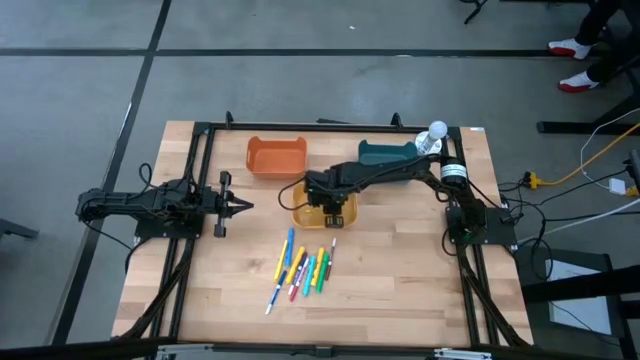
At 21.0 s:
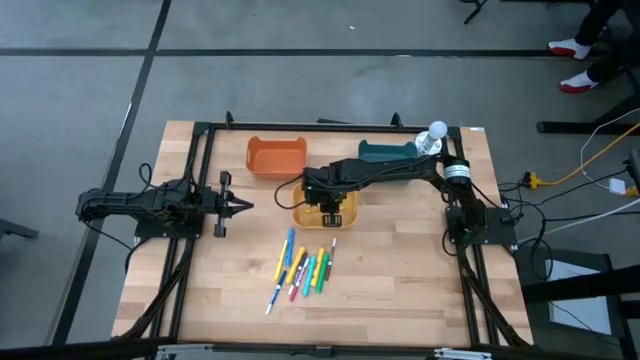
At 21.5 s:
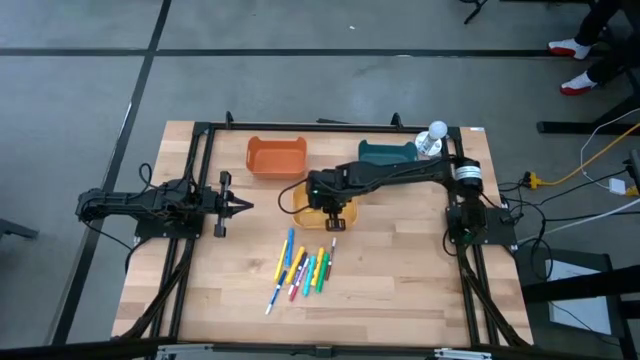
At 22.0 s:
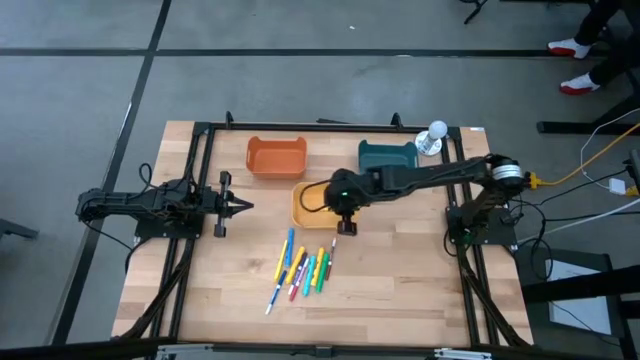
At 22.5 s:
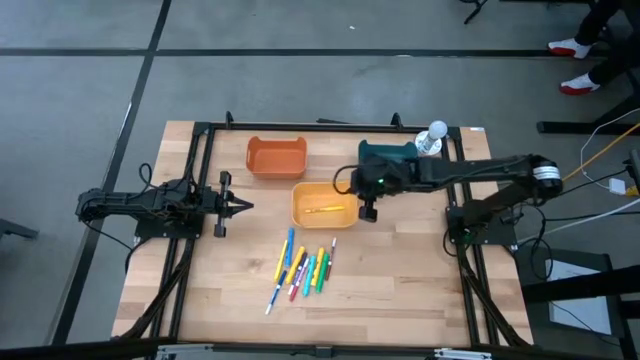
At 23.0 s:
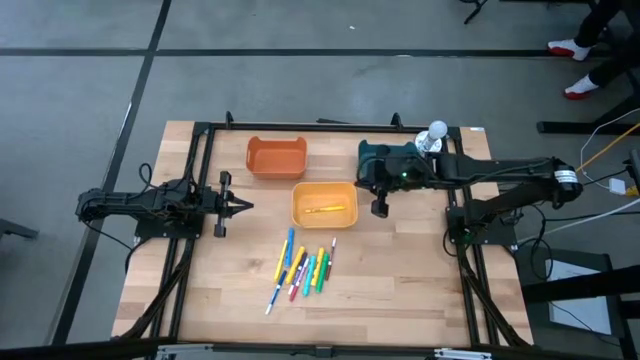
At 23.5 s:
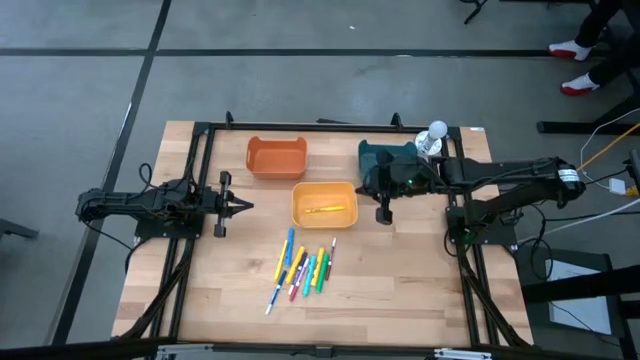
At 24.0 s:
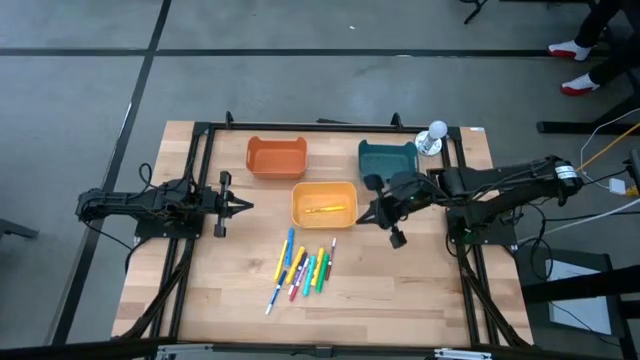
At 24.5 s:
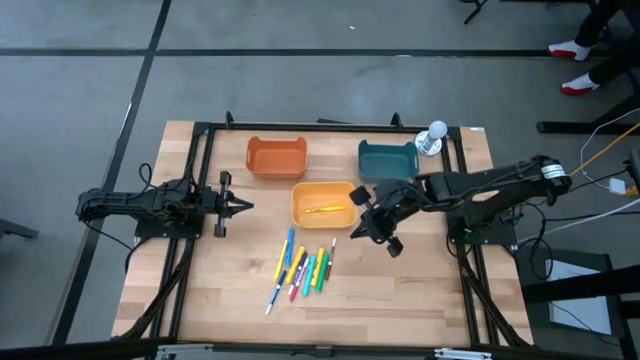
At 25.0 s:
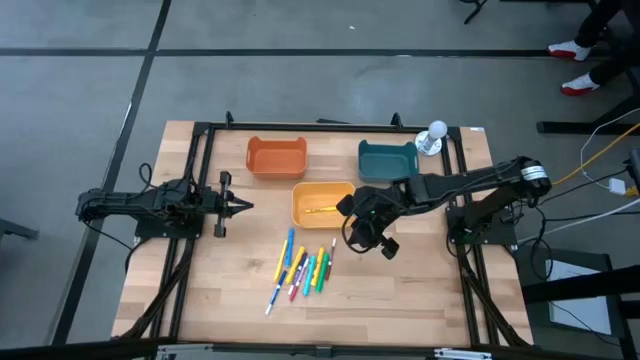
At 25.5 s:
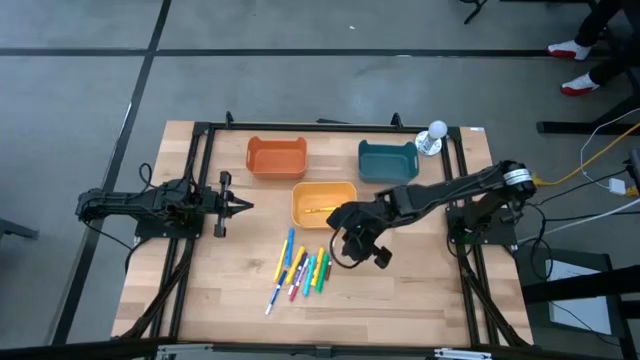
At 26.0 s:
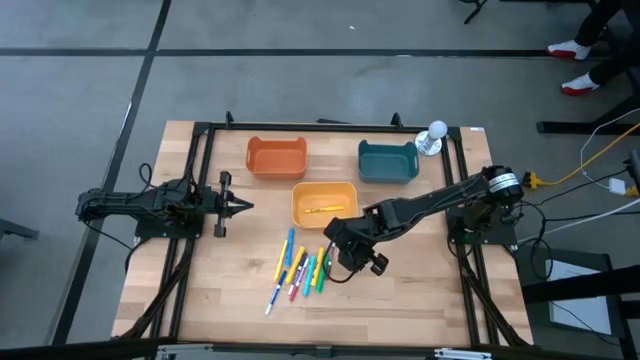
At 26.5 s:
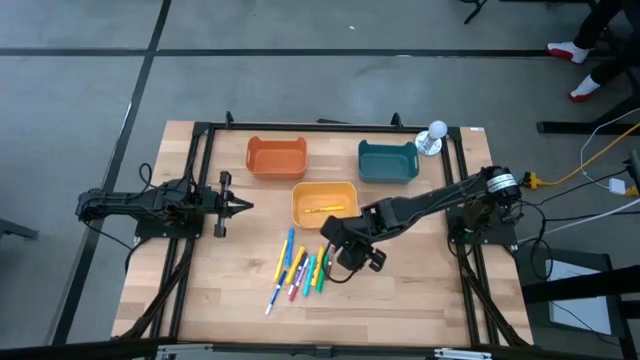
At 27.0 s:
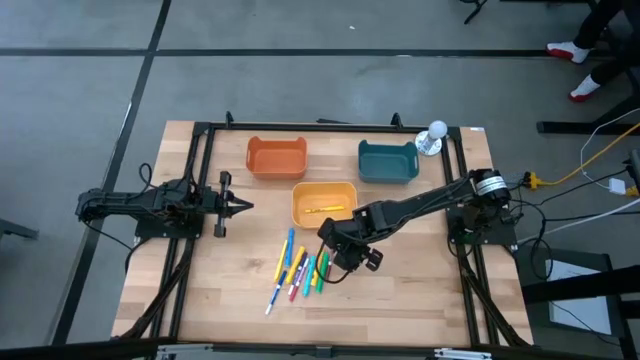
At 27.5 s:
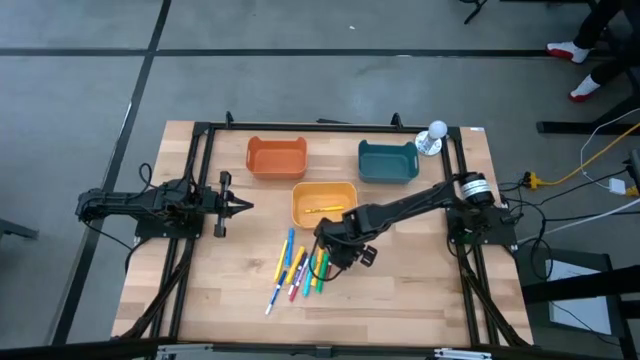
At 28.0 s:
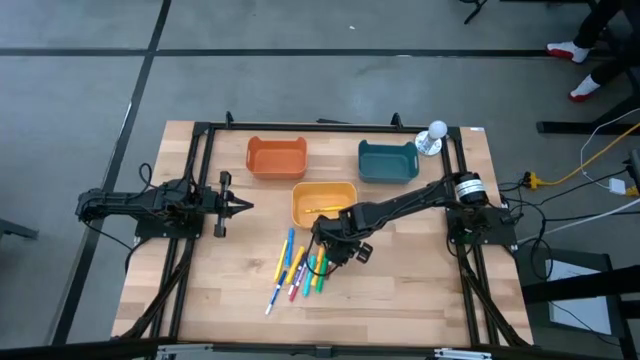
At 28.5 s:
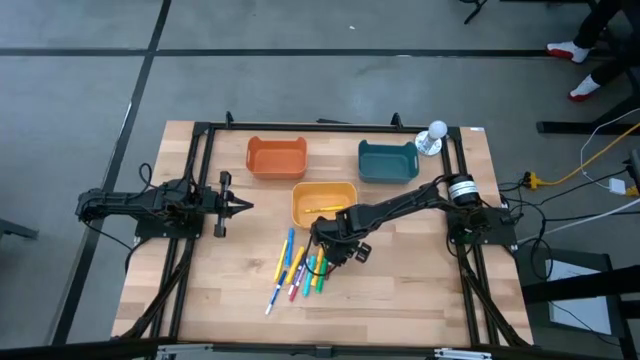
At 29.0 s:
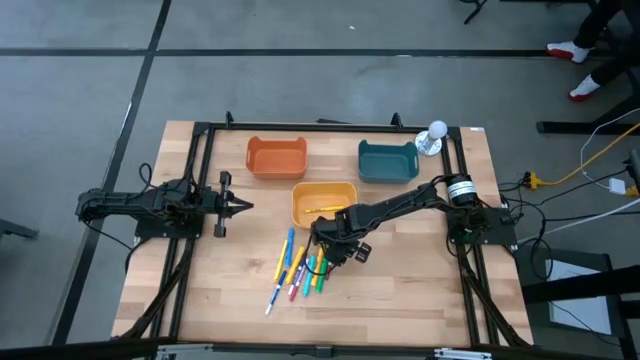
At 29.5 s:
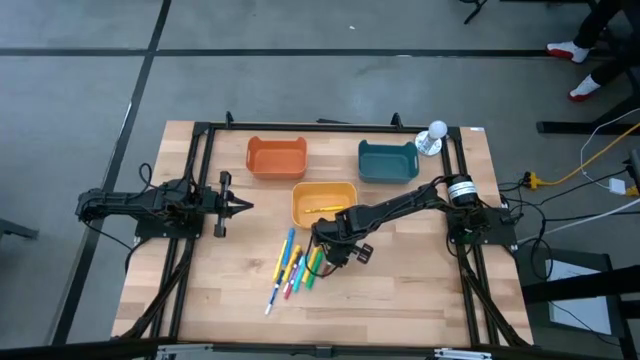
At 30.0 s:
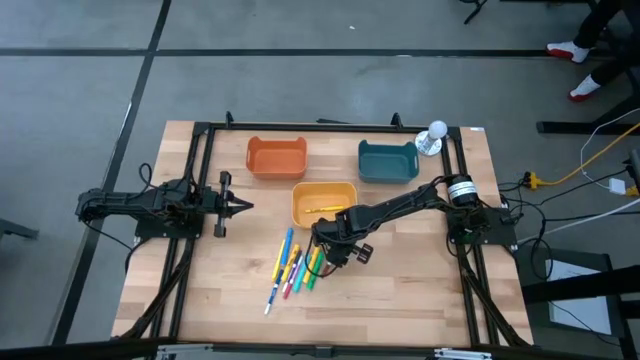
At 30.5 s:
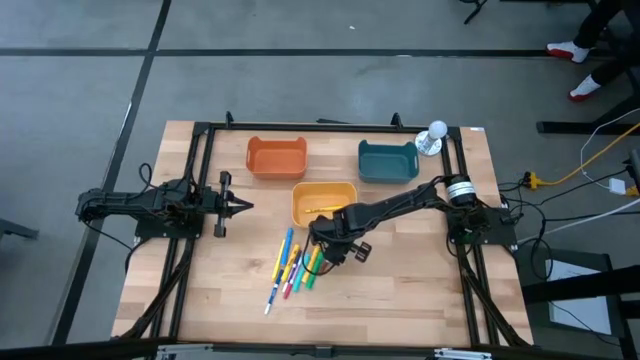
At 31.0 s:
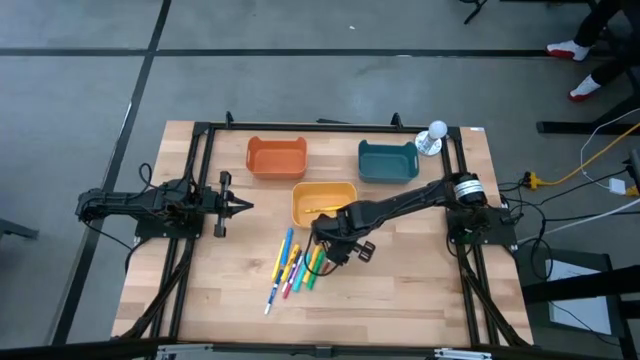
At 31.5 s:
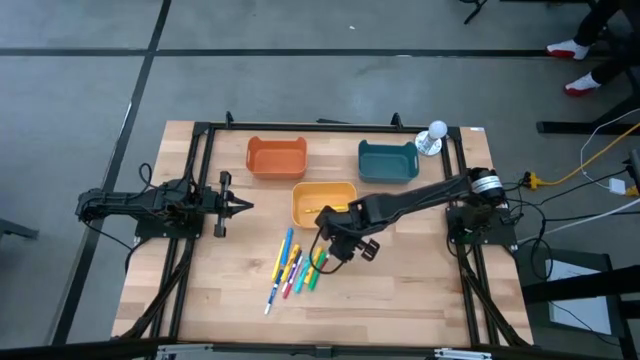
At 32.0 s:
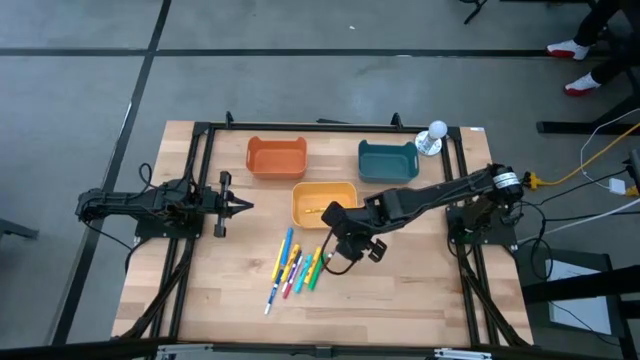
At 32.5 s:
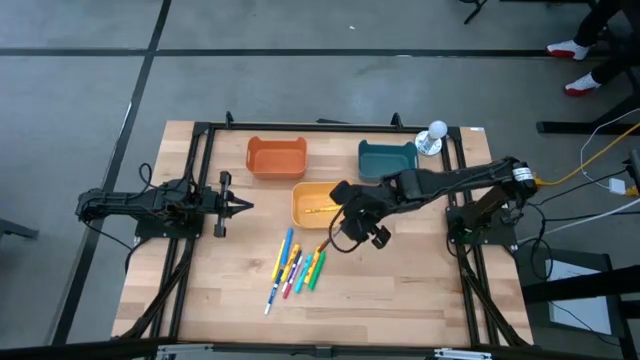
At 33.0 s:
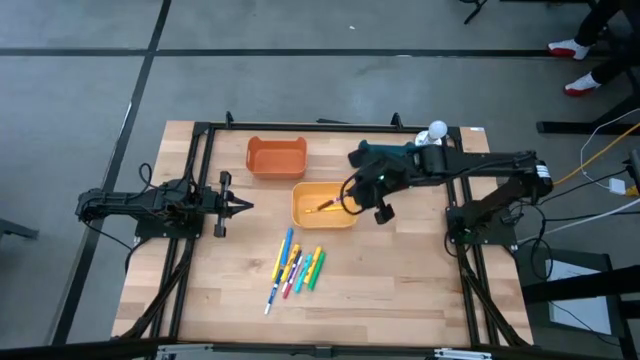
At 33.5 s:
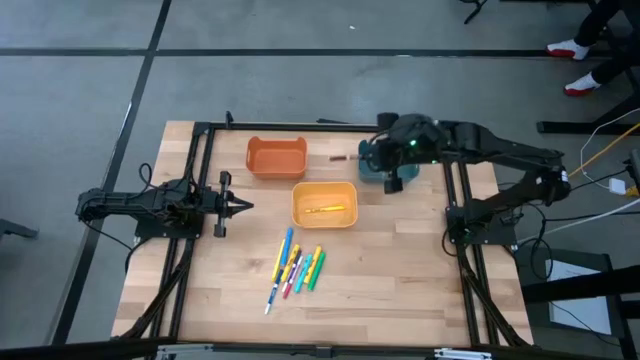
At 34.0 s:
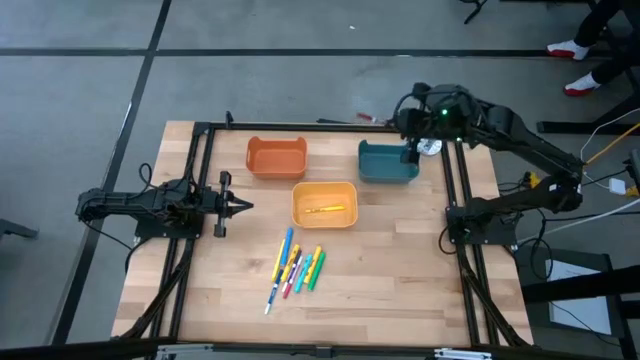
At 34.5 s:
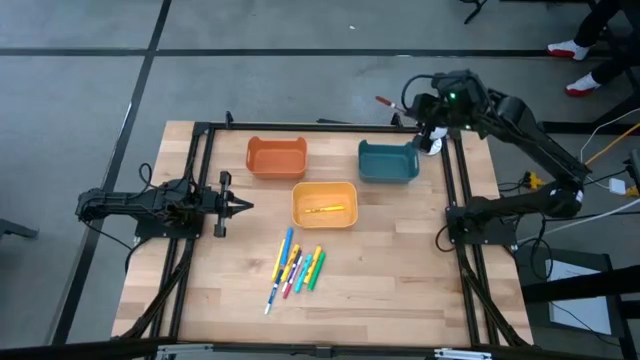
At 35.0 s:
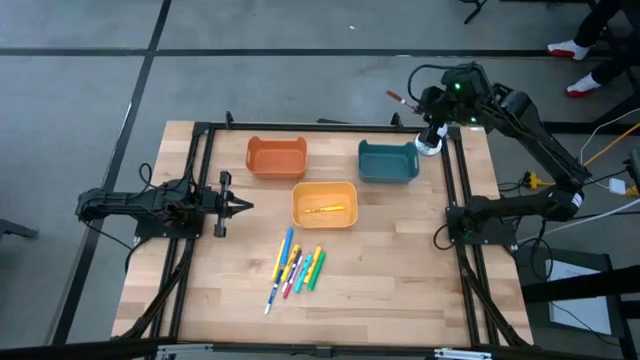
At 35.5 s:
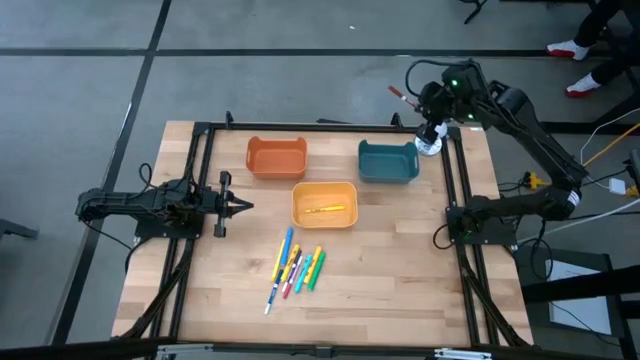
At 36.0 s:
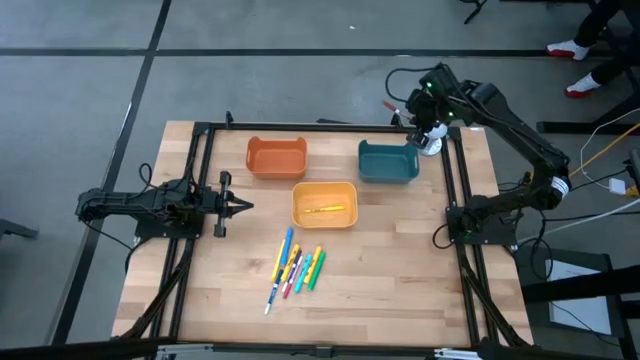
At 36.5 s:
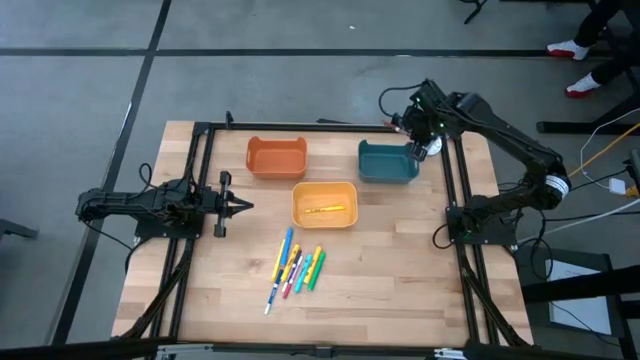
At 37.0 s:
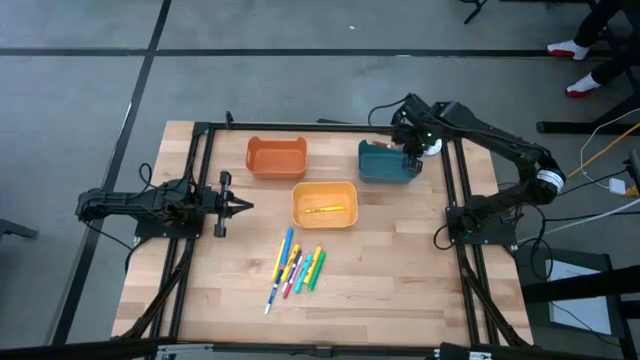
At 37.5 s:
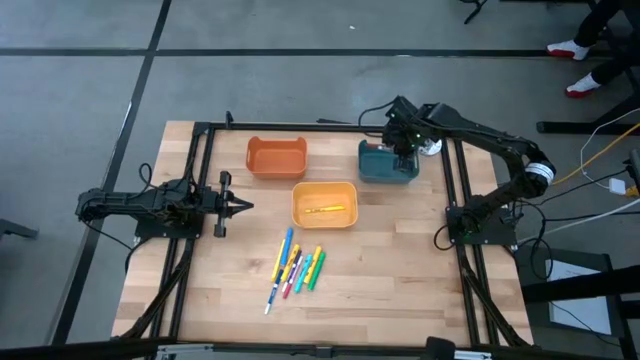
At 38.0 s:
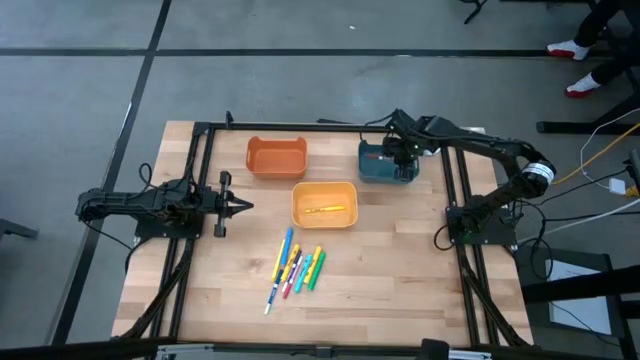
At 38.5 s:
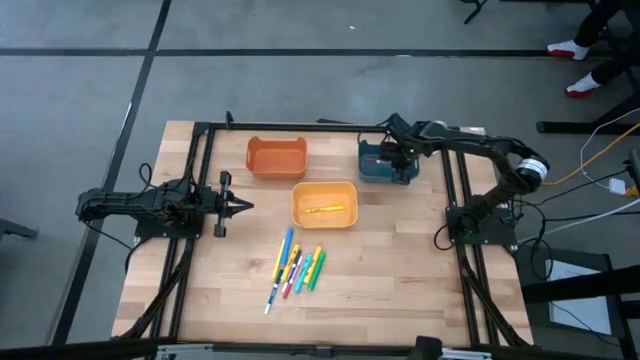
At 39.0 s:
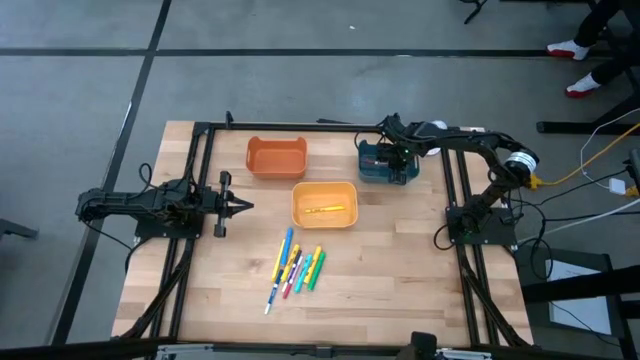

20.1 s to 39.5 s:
Task: Pick & Place Markers
Put the brown marker pen into the blue bin

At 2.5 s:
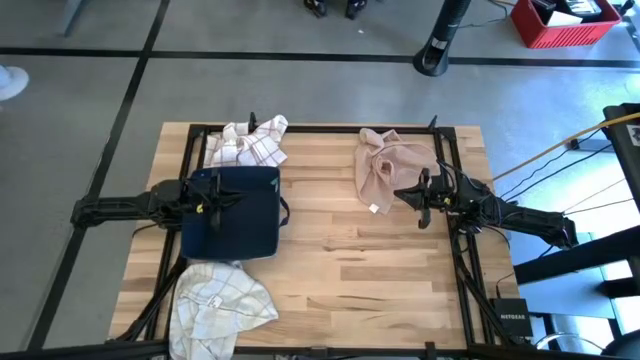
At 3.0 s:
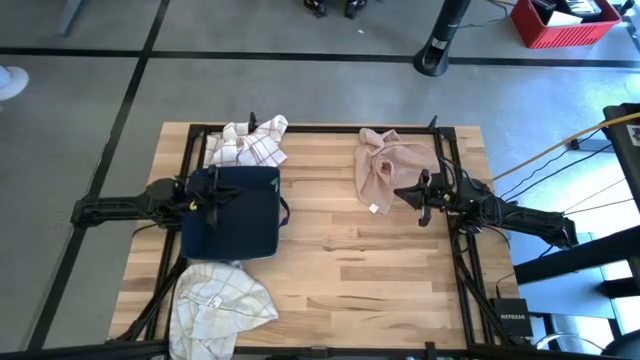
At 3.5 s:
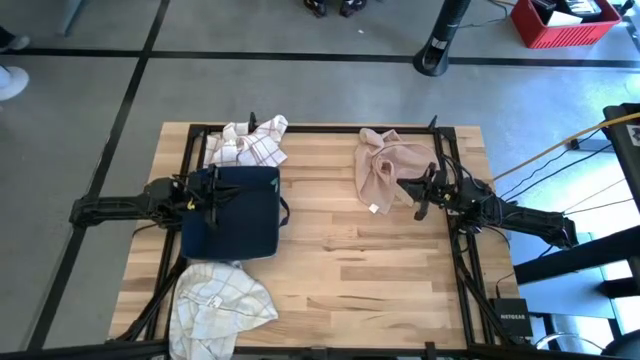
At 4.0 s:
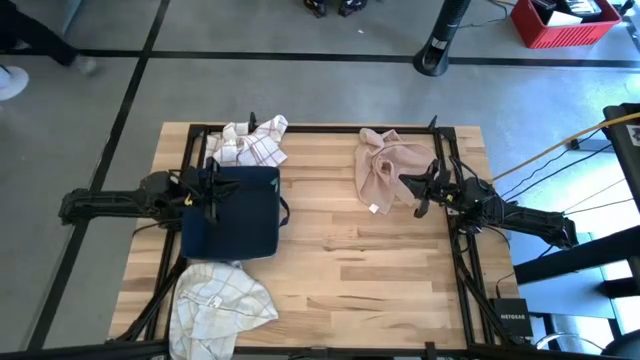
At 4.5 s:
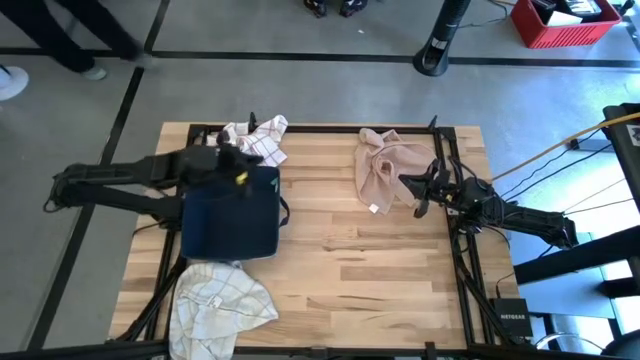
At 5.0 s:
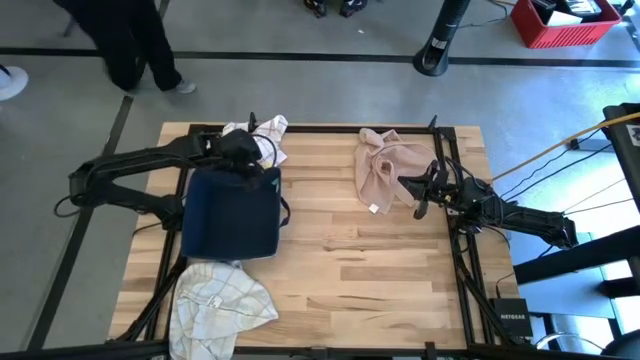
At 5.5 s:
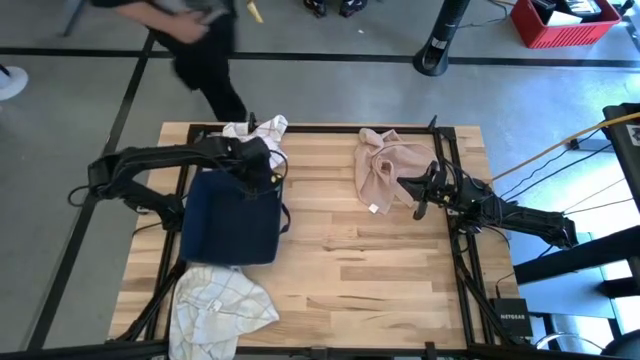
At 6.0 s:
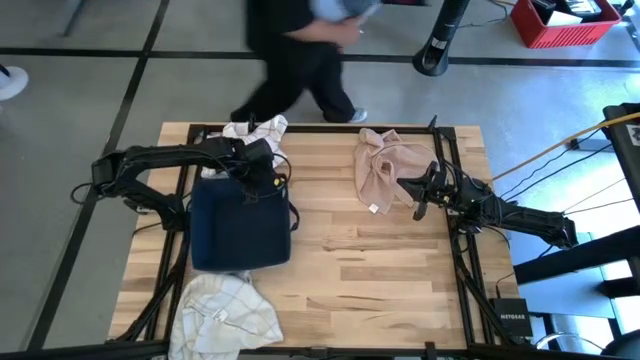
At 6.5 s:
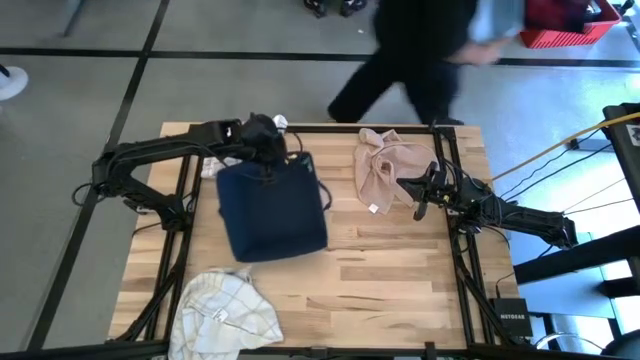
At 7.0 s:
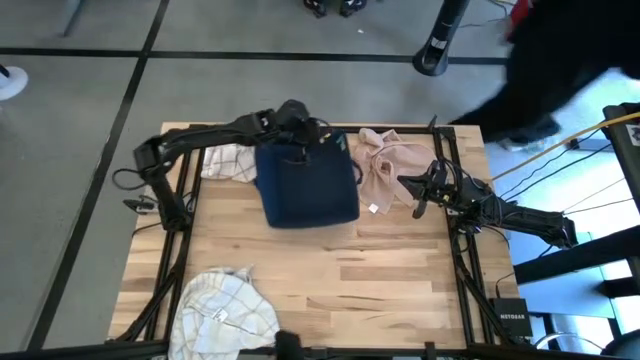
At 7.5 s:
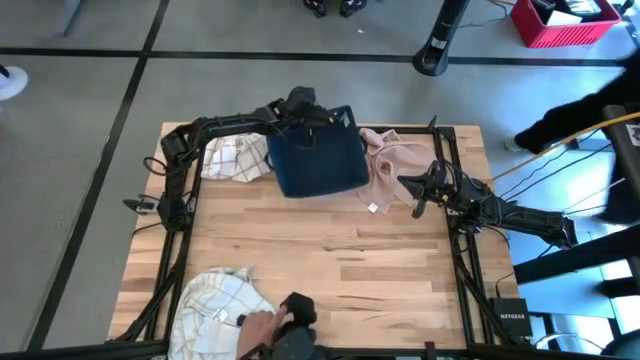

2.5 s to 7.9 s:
Task: Fold towel
Move the blue laundry bin to the top center of the table
